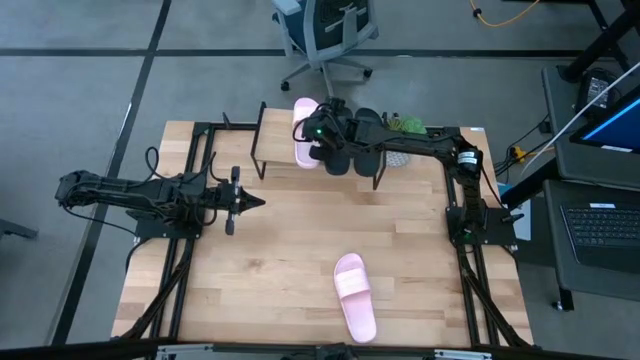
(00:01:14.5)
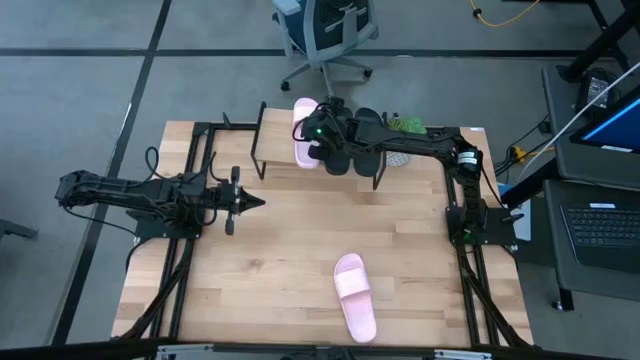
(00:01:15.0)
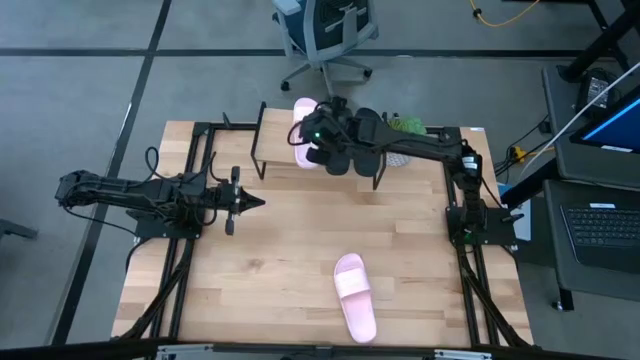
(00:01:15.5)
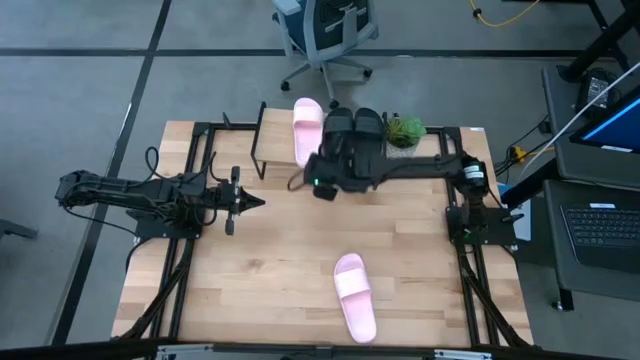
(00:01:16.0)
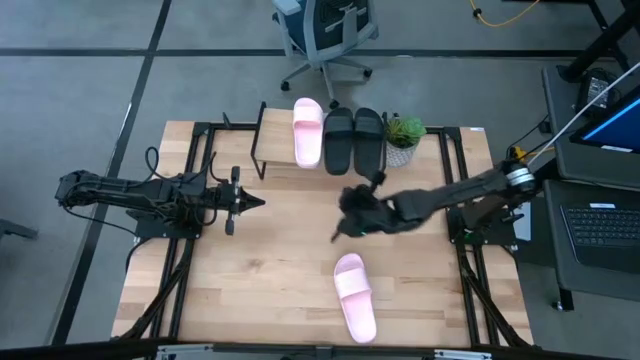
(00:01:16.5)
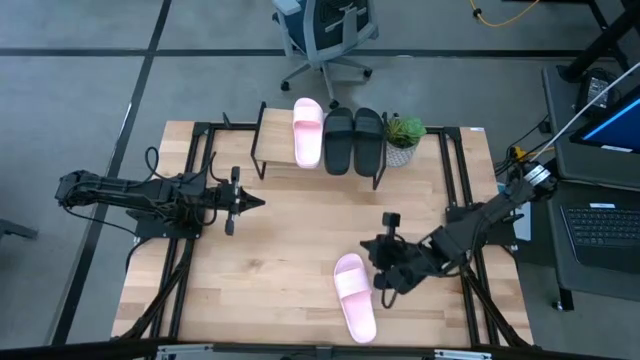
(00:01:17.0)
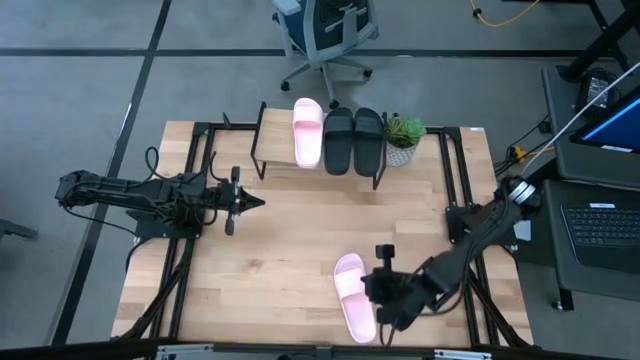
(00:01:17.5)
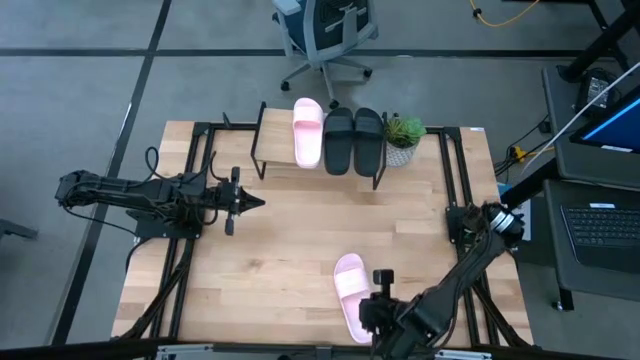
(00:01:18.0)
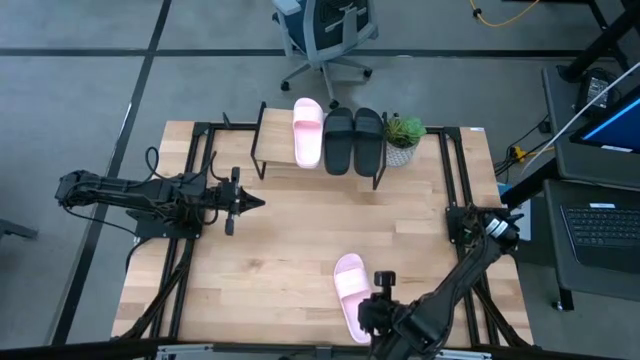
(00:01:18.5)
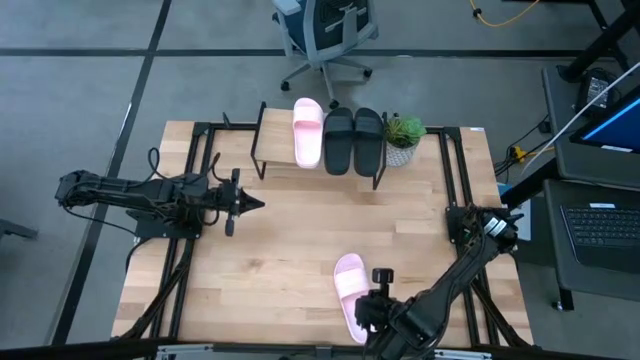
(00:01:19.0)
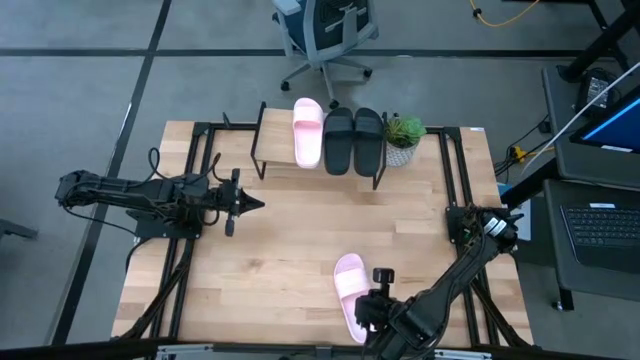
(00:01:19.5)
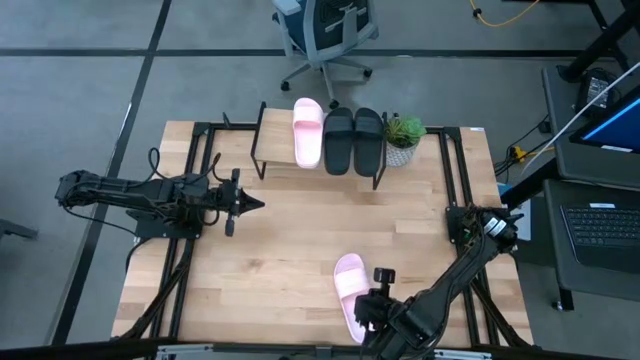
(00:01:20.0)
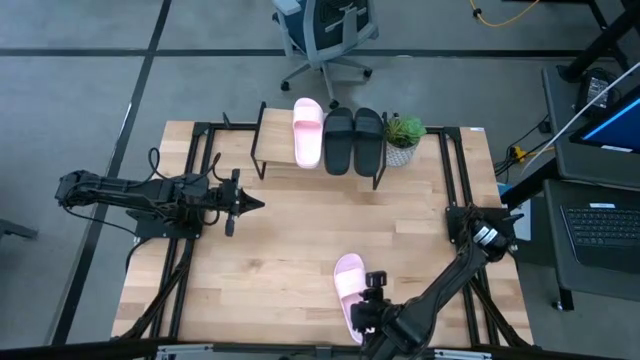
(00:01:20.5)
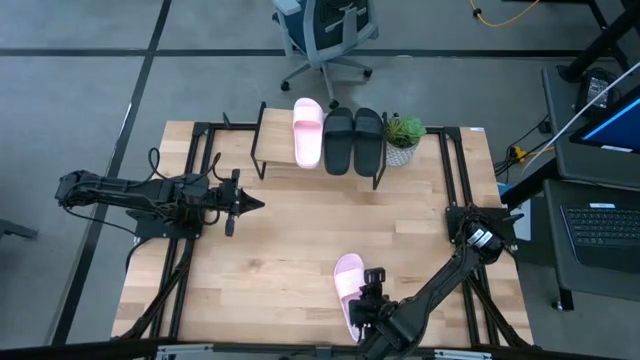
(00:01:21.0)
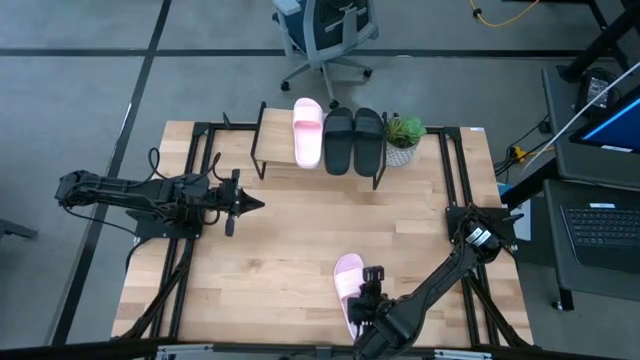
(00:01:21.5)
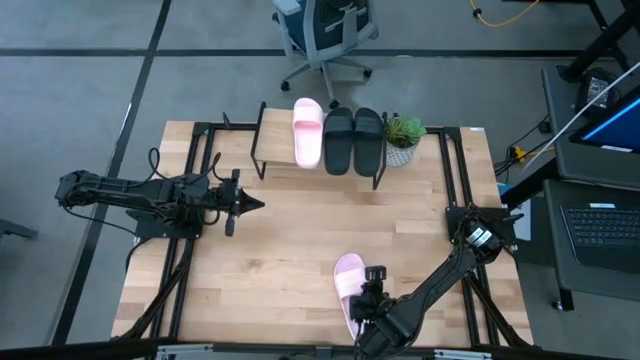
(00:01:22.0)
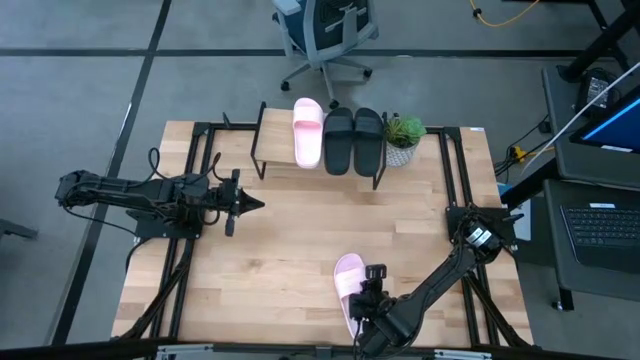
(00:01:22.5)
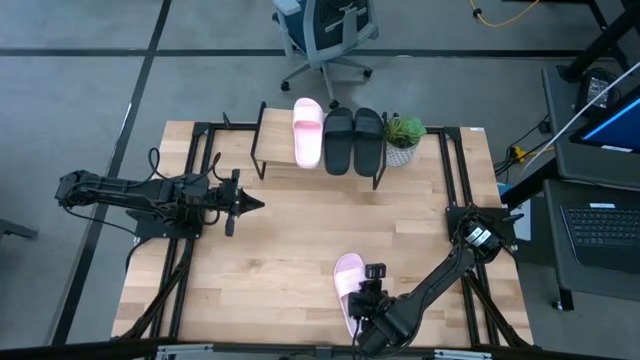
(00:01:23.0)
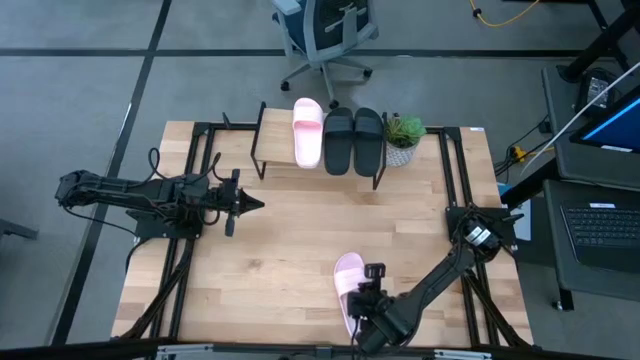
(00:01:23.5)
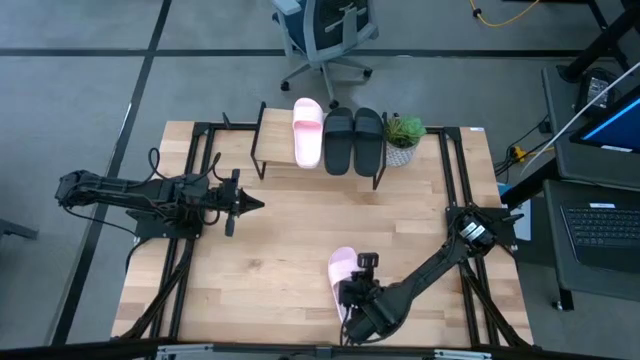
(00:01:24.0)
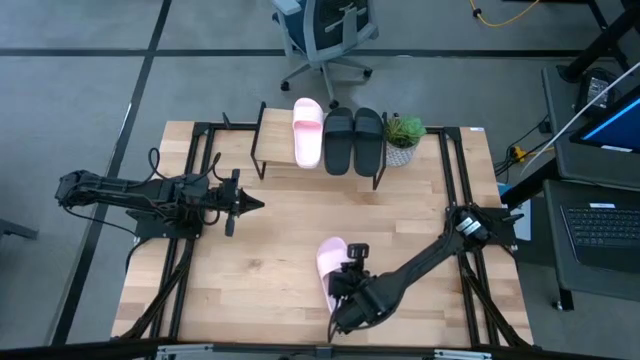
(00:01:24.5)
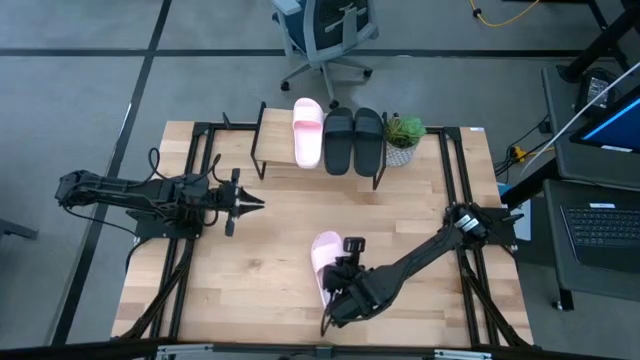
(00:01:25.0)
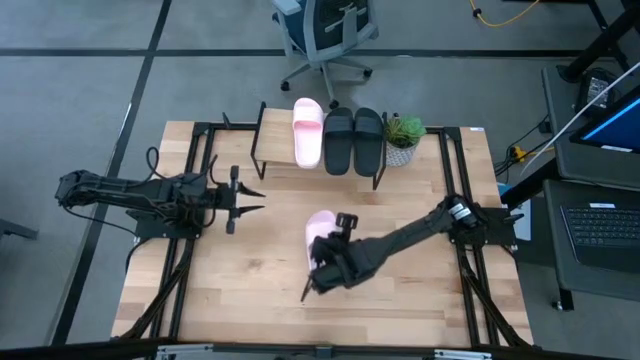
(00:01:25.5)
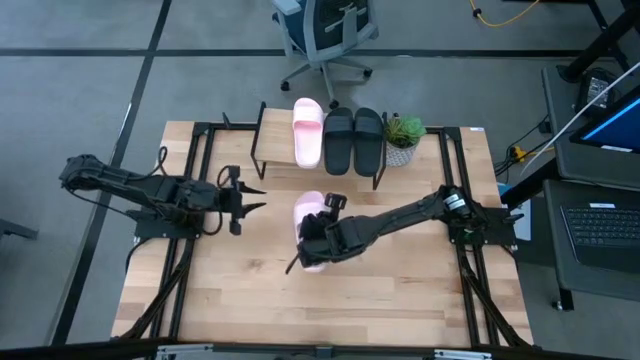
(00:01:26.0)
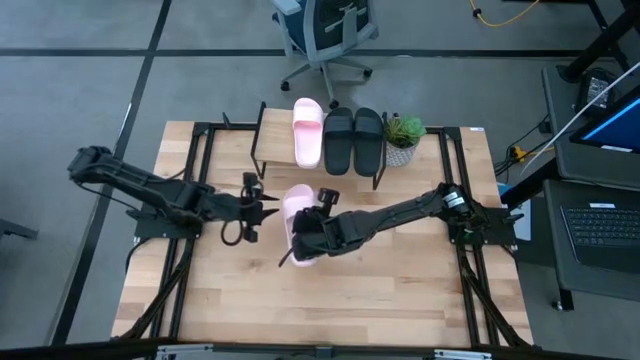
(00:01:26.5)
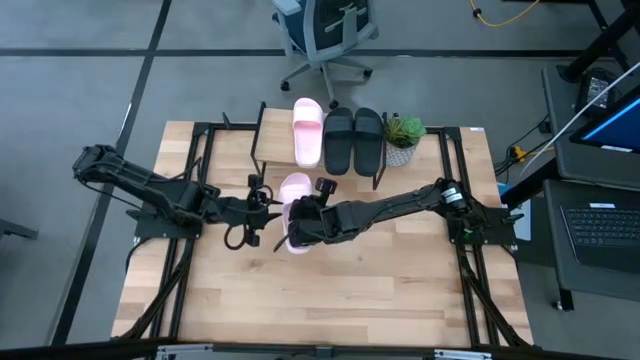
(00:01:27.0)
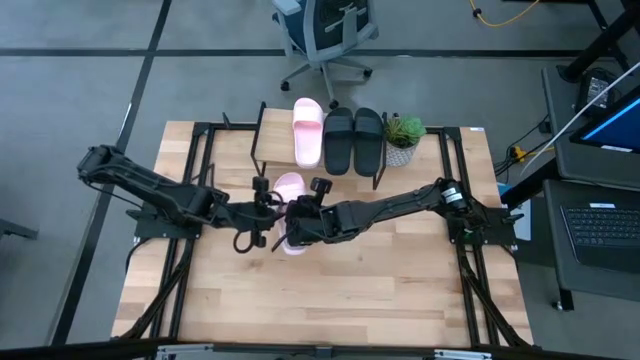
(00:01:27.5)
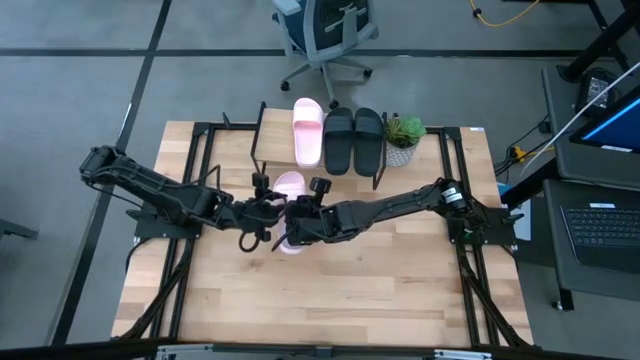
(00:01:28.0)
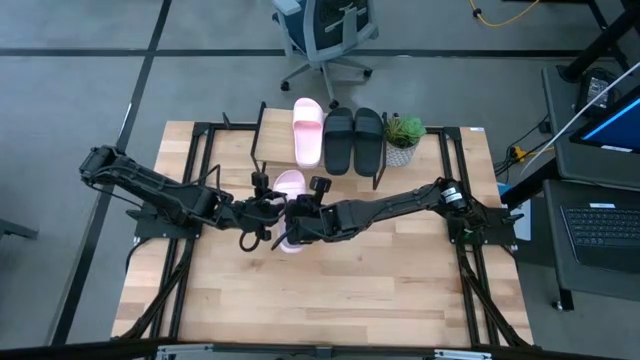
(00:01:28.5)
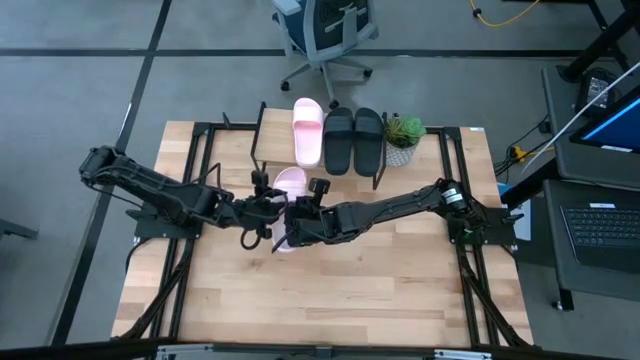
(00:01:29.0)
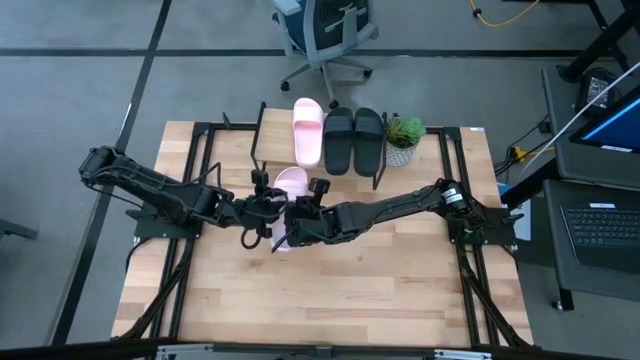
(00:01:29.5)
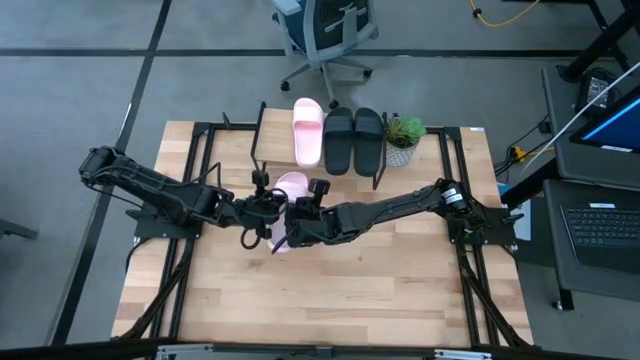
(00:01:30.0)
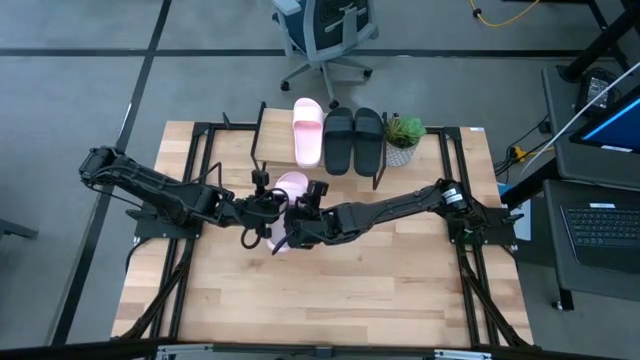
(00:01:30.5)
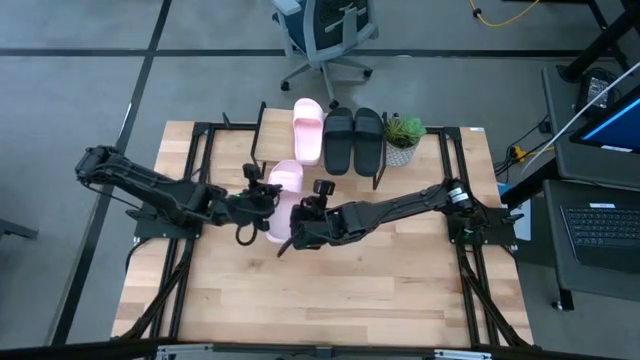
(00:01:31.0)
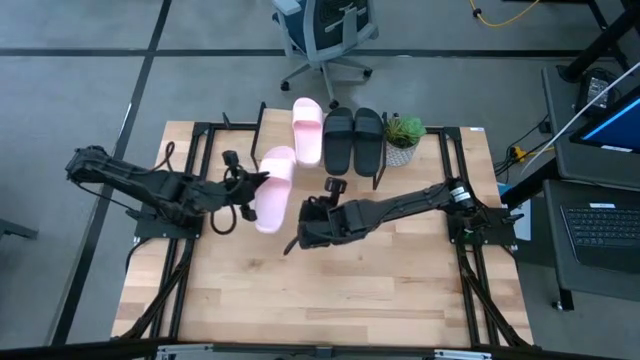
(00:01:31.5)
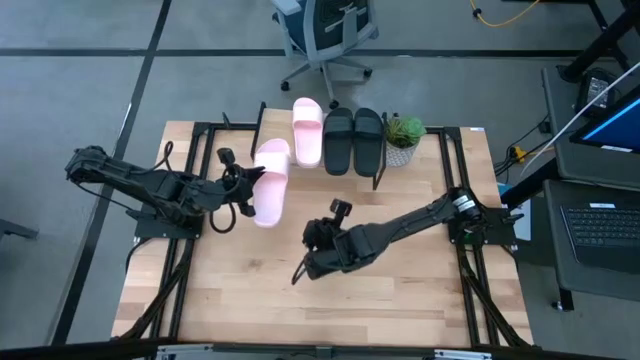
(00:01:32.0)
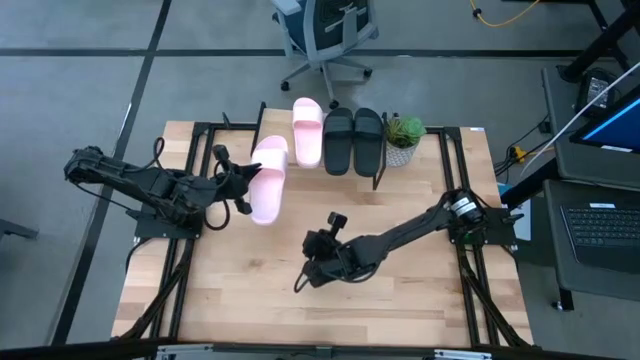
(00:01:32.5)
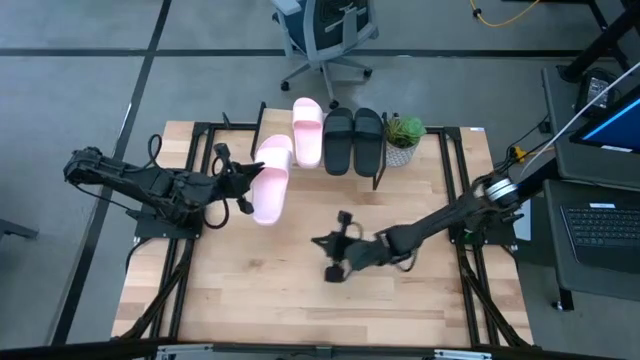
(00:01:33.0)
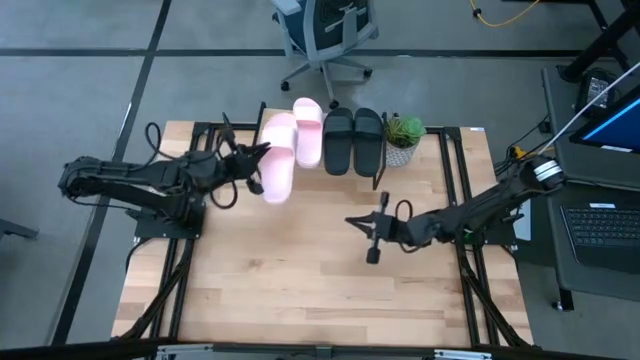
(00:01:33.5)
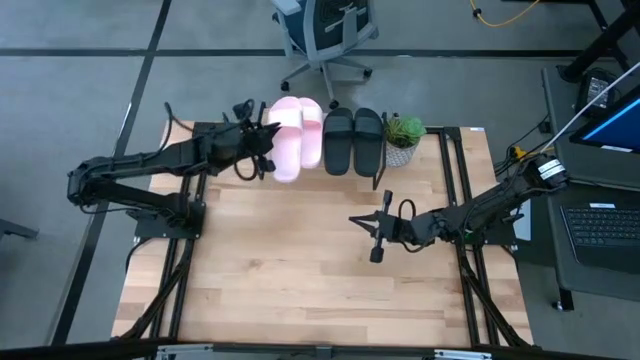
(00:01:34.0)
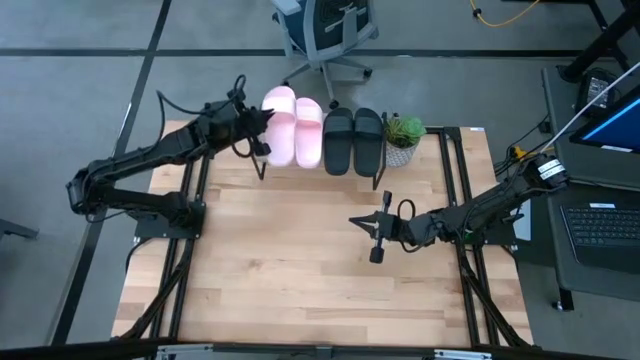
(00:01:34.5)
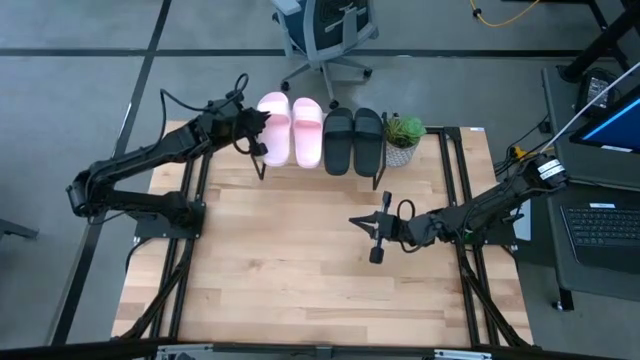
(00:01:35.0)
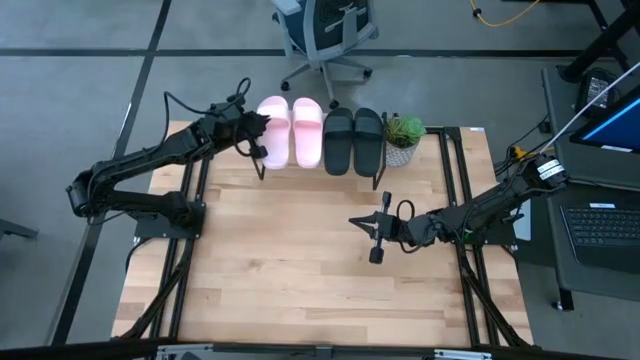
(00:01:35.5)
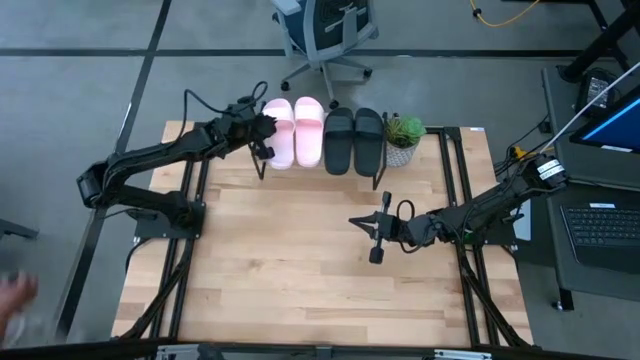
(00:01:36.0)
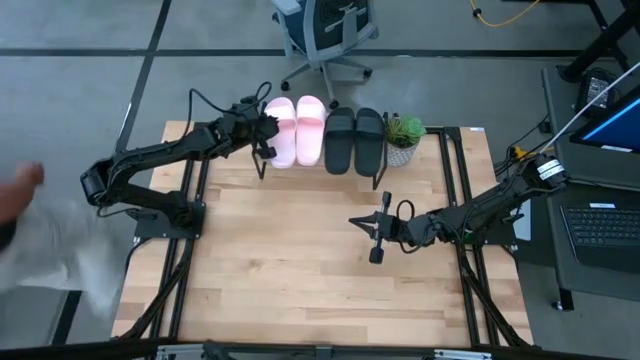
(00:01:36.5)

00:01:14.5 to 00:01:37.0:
Task: Pick and place slides into the shelf
Put the pink slides on the shelf
